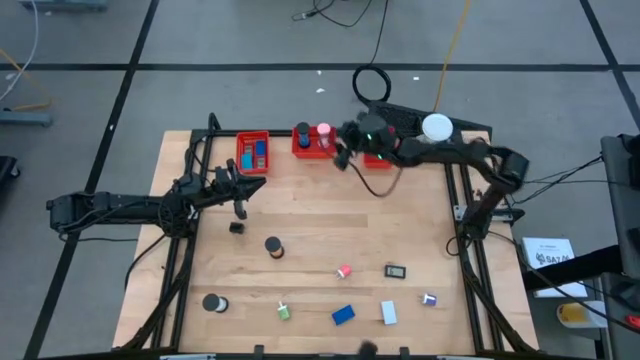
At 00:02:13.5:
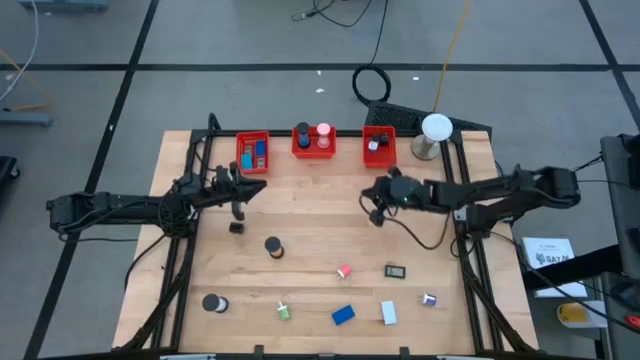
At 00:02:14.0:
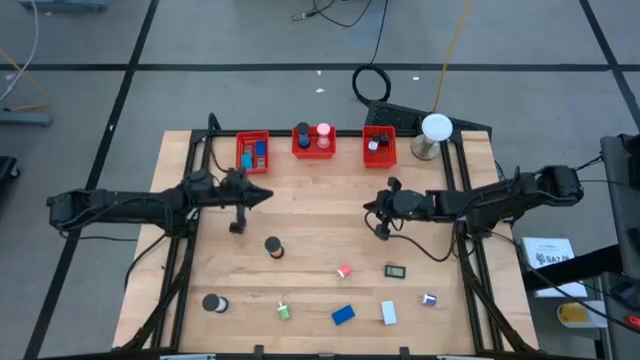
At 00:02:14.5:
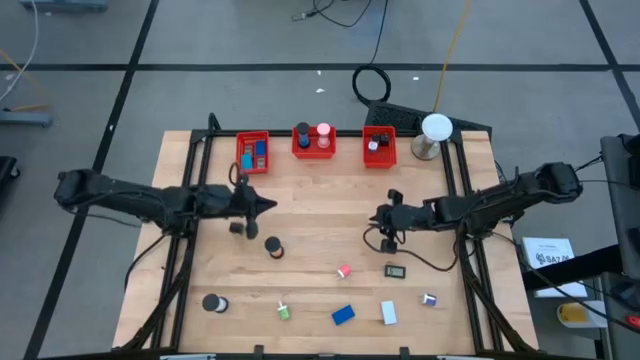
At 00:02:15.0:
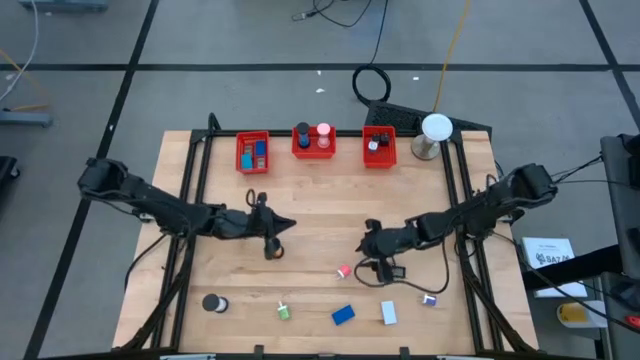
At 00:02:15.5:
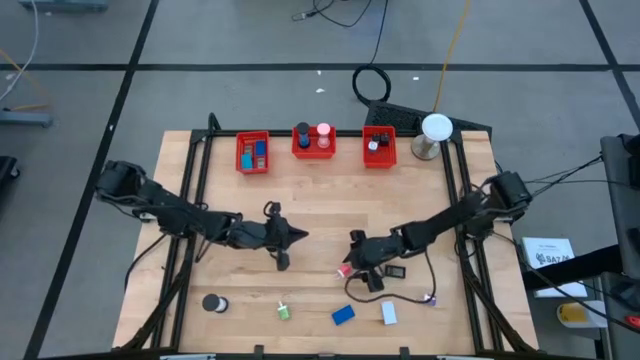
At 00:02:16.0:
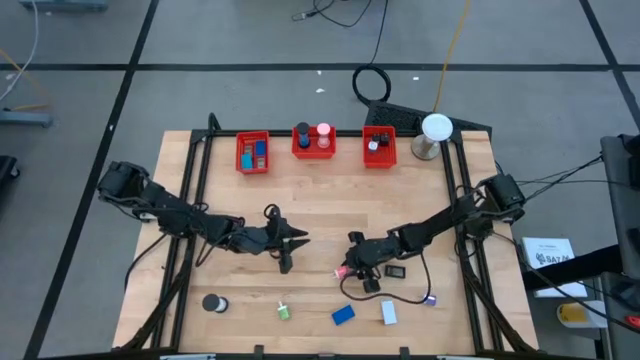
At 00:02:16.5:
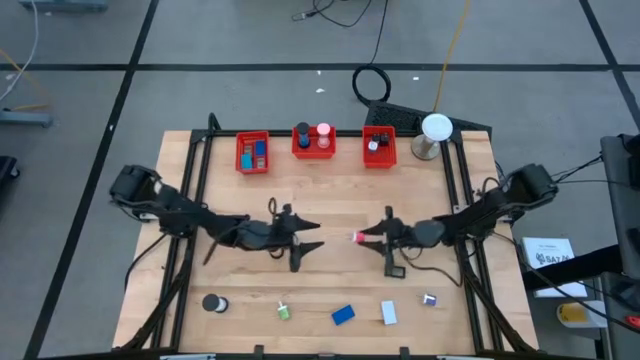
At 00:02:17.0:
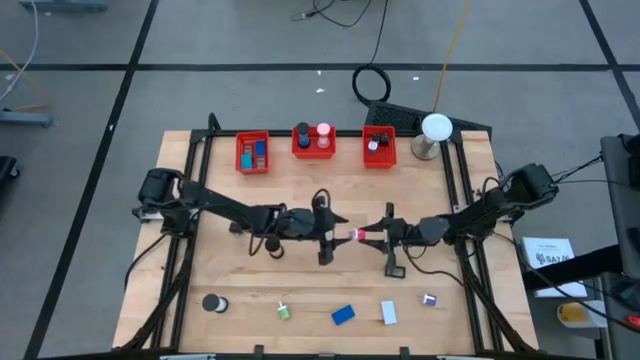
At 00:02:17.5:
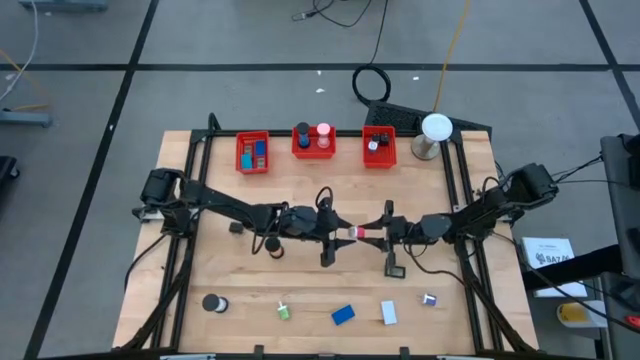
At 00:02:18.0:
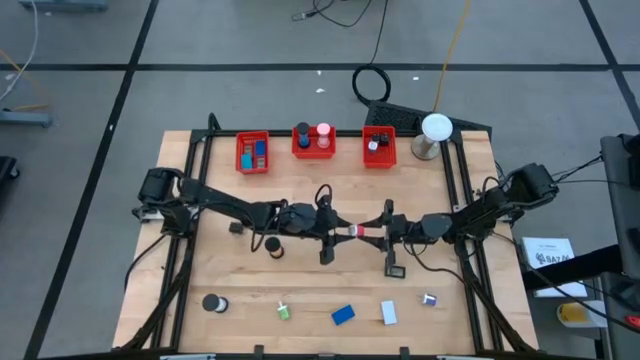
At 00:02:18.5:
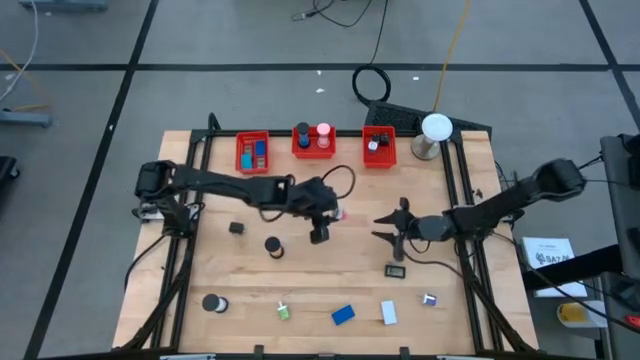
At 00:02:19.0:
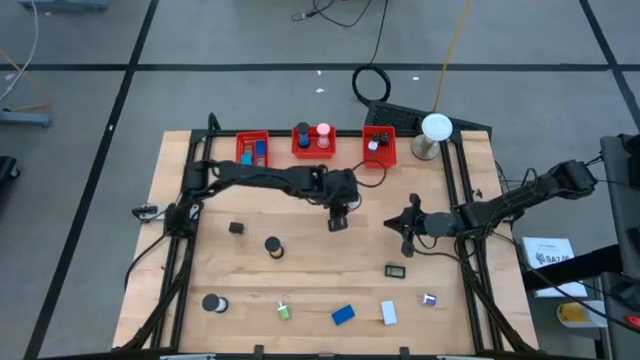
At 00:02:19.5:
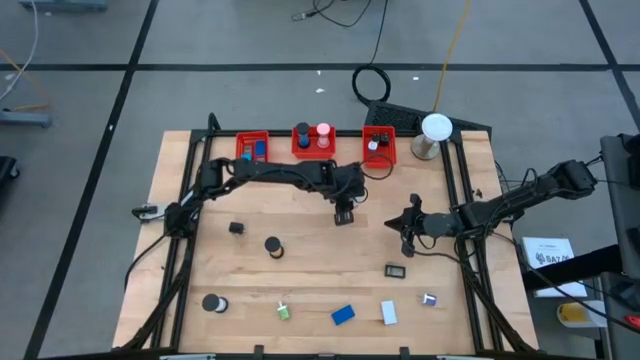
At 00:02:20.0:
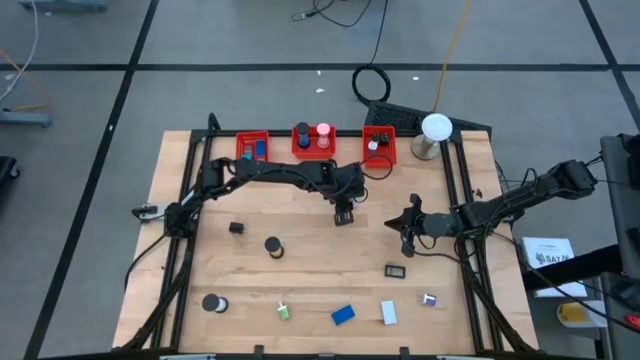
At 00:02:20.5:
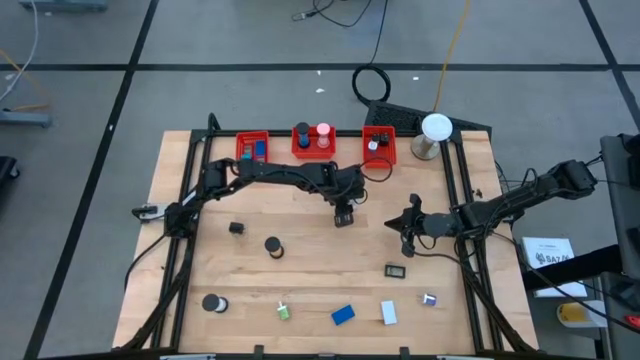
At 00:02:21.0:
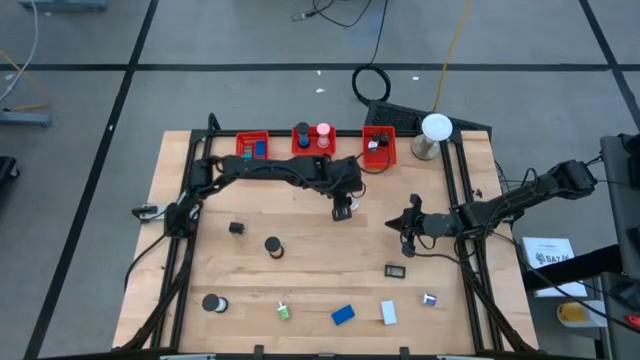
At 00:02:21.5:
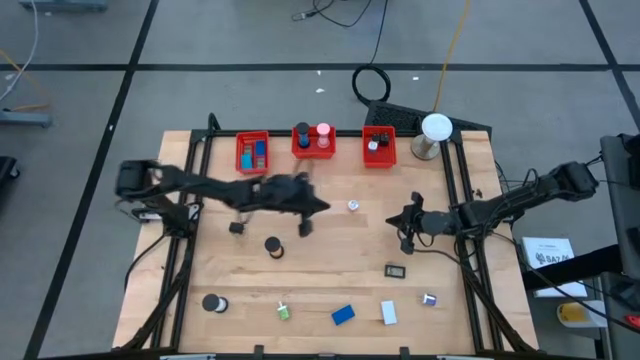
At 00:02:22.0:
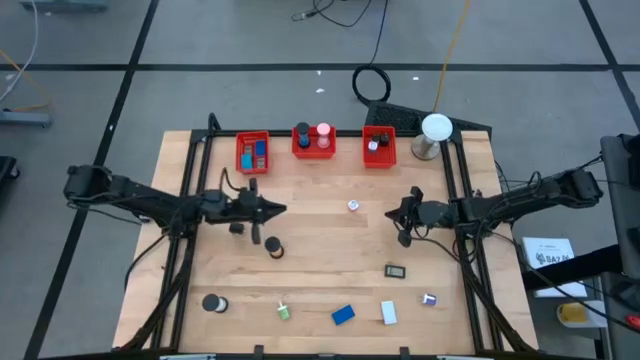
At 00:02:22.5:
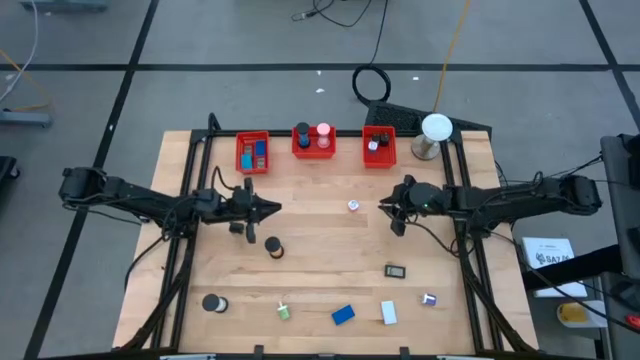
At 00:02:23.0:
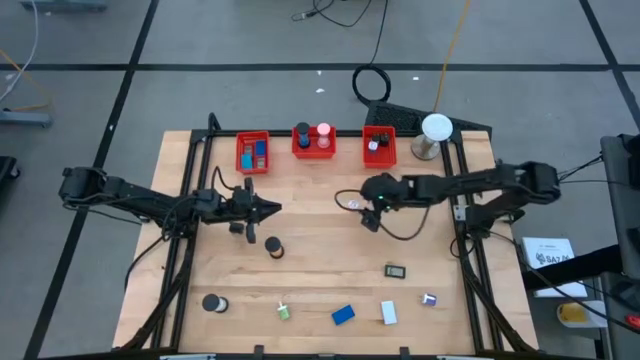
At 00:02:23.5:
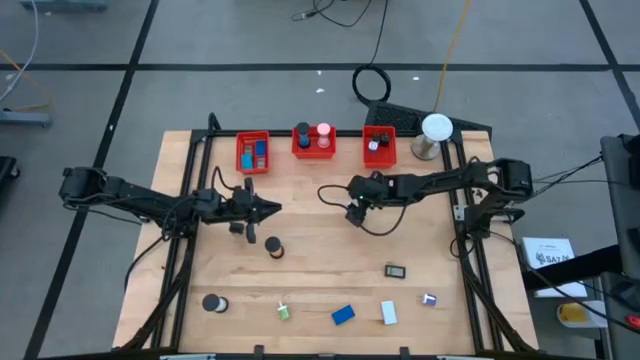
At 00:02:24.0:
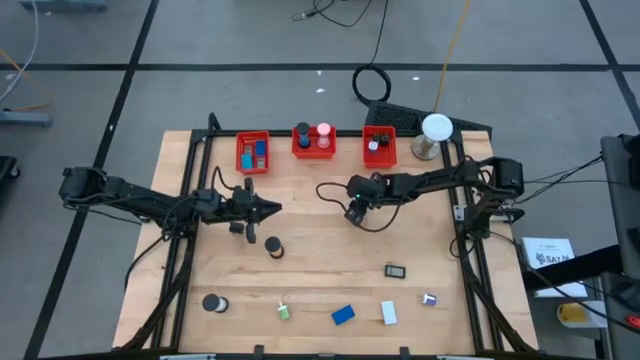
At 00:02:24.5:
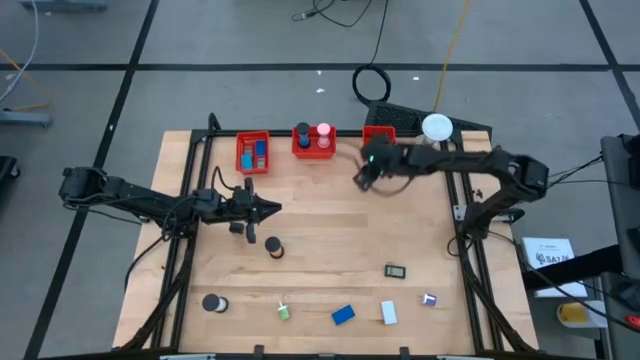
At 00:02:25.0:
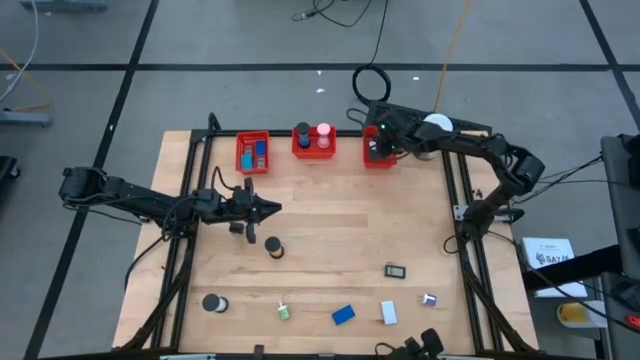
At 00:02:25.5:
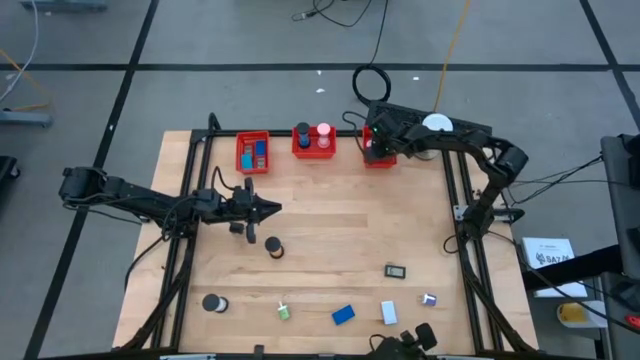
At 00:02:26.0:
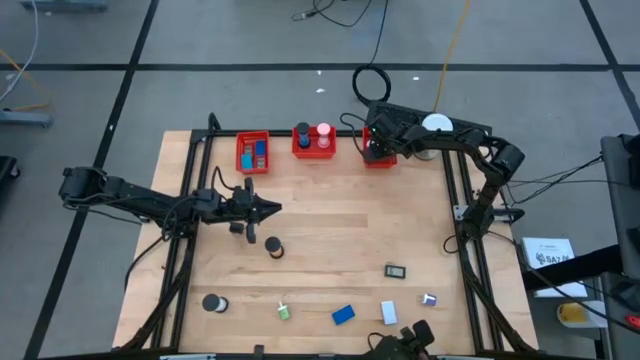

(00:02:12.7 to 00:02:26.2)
Task: Pick & Place Office items
Put the pink charger adapter into the right orange basket

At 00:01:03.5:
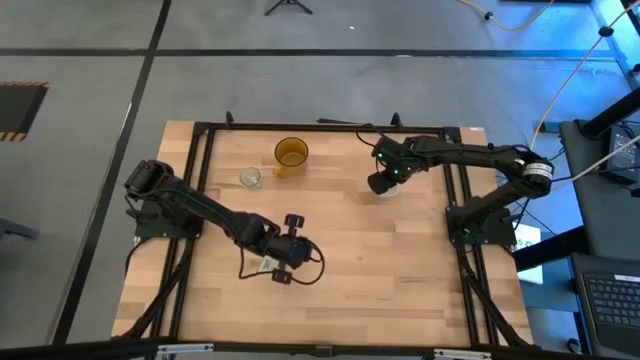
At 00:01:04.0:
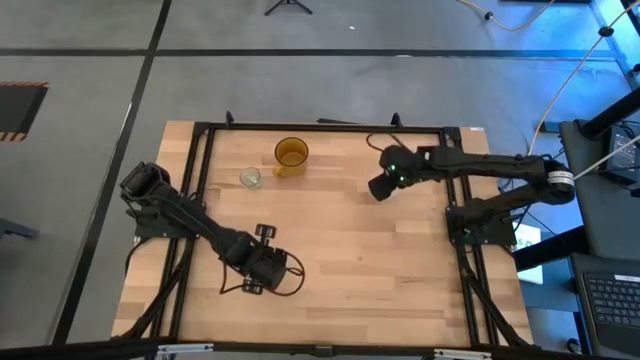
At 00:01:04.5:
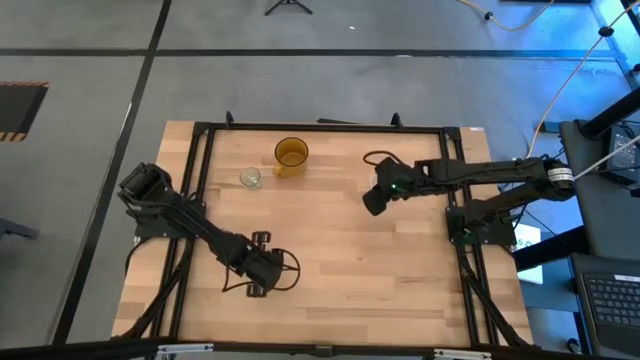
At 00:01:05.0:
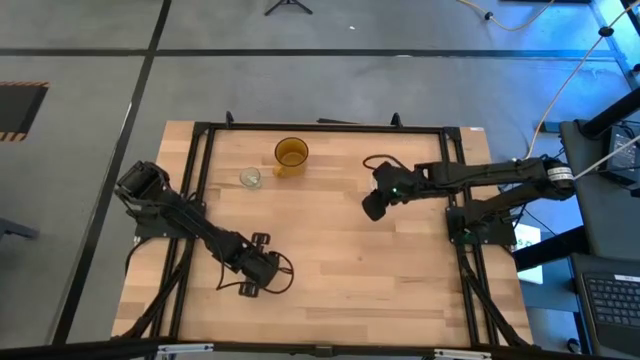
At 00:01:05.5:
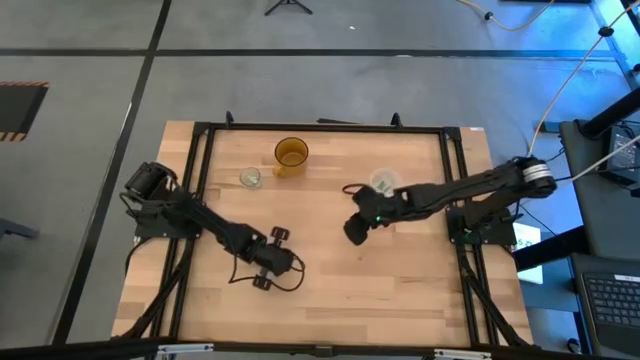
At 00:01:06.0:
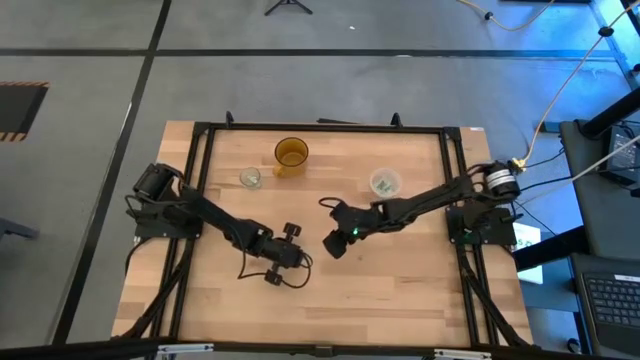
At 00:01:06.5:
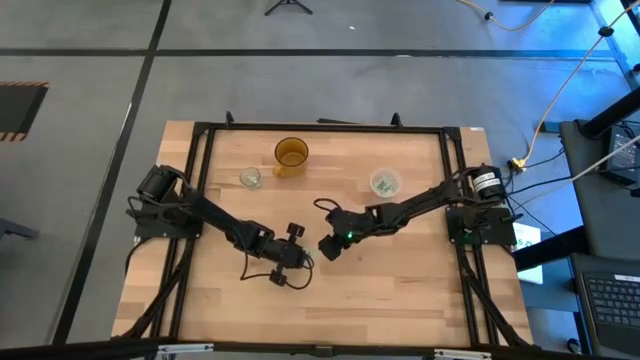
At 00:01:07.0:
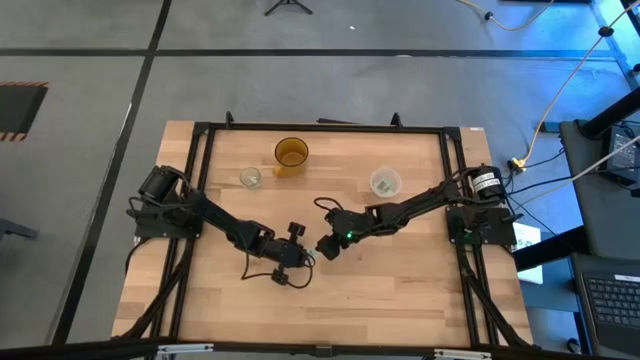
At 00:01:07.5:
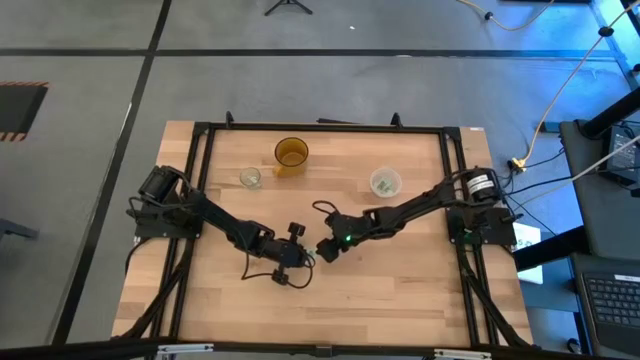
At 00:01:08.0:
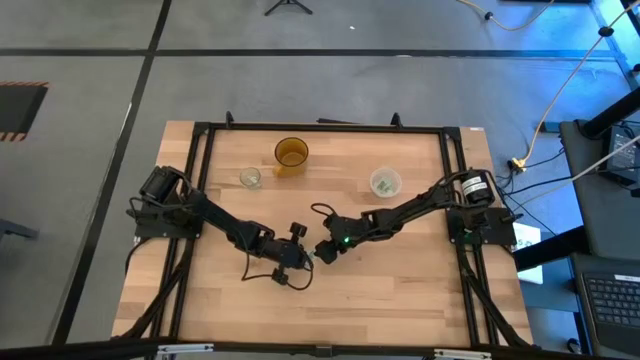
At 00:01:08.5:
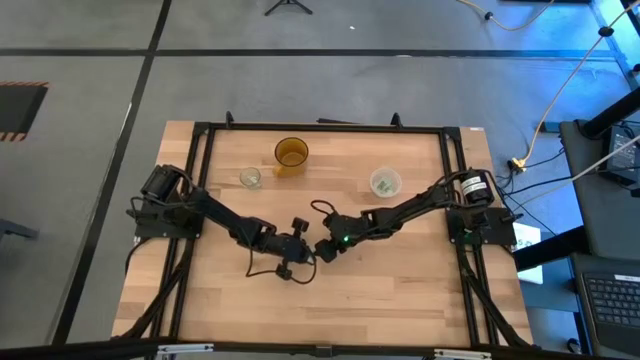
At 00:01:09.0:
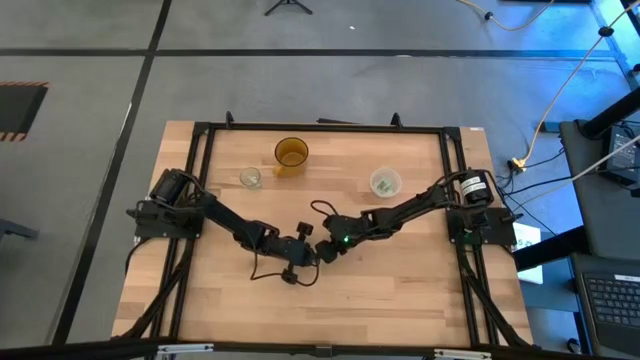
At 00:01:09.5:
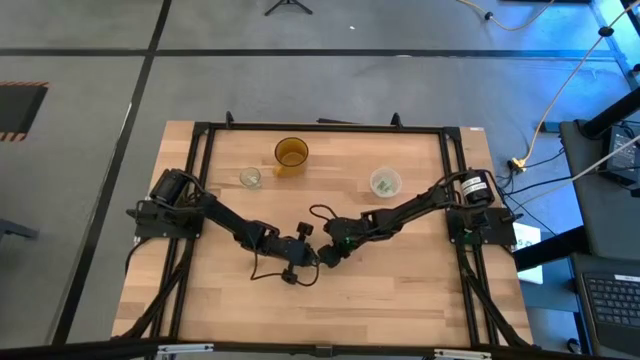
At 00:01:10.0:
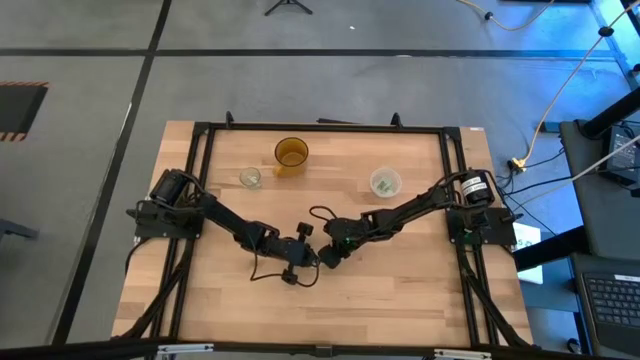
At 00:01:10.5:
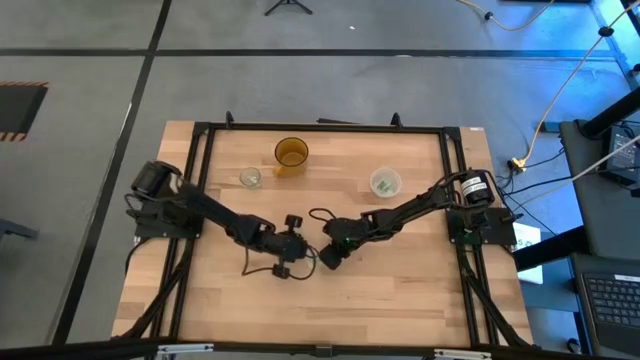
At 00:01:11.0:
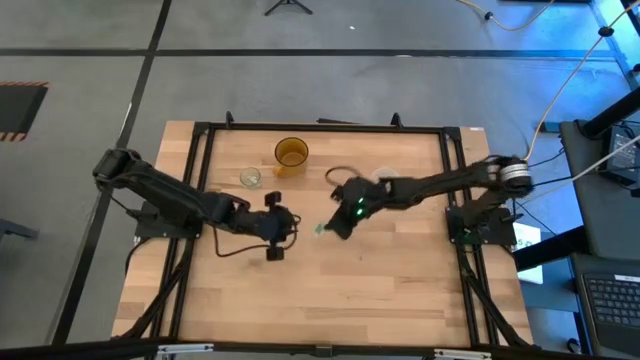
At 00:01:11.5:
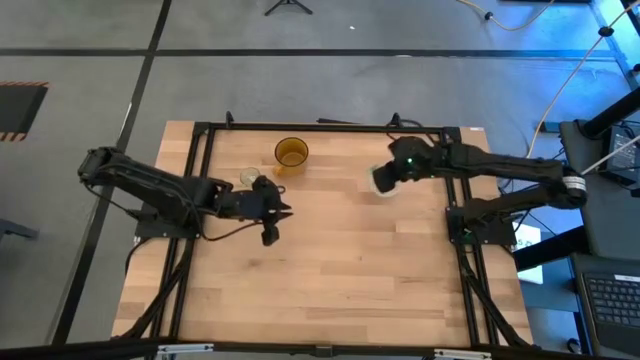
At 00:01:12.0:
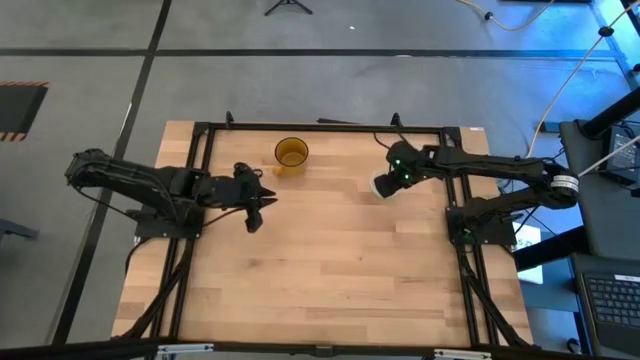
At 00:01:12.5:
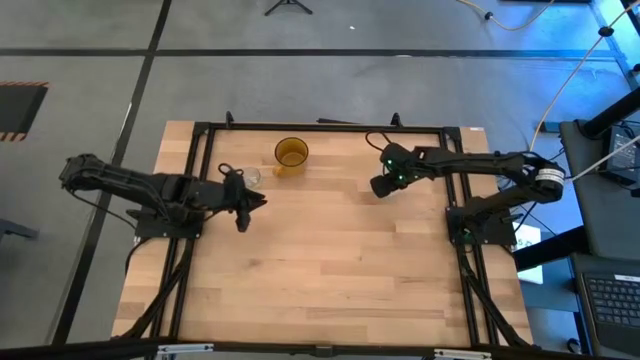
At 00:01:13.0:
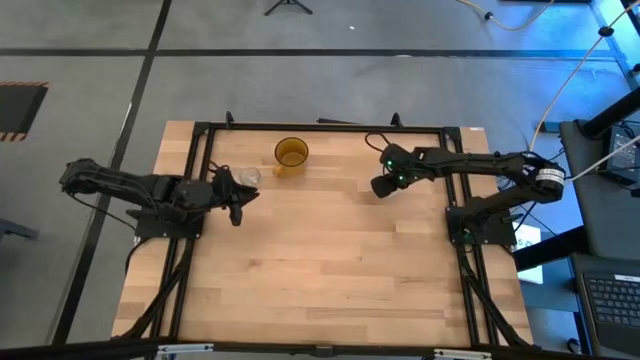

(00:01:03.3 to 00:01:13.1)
Task: Pick and place Stevia / Truvia into bins
Put the stevia packet into the transparent container
